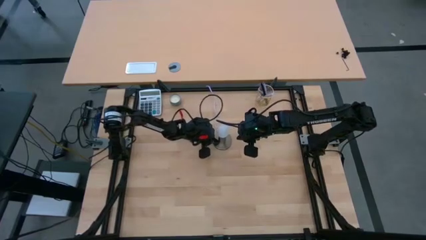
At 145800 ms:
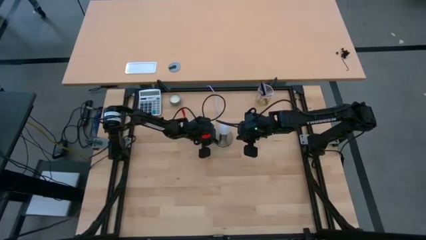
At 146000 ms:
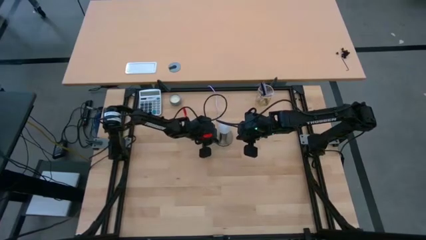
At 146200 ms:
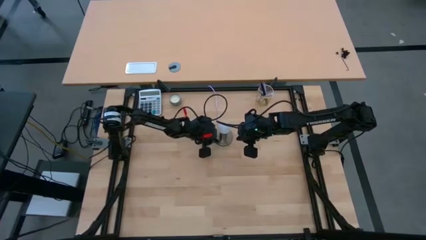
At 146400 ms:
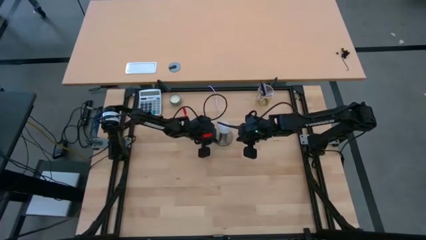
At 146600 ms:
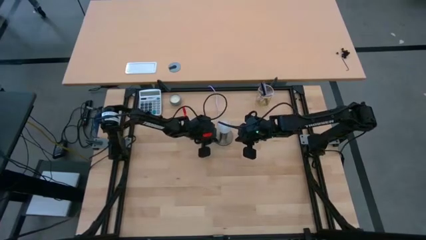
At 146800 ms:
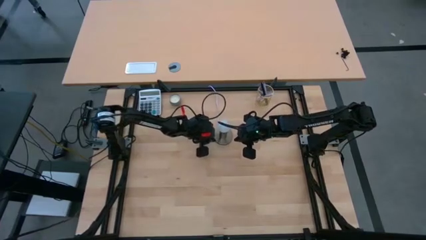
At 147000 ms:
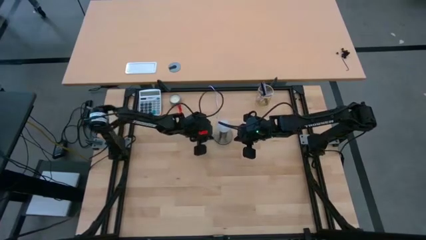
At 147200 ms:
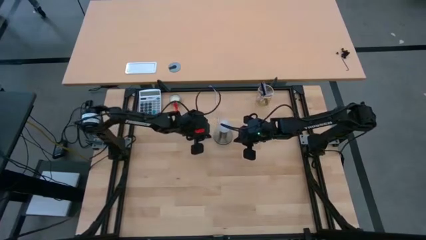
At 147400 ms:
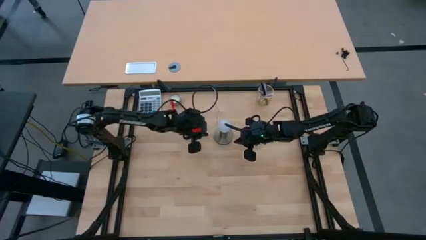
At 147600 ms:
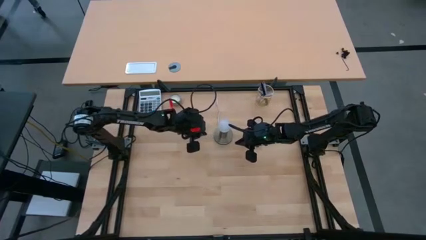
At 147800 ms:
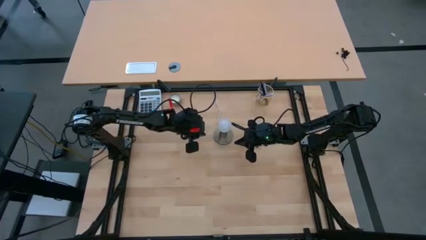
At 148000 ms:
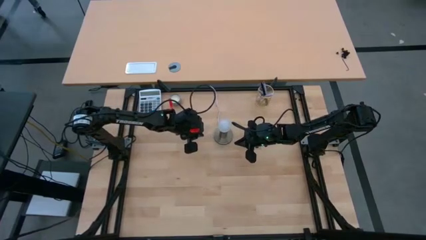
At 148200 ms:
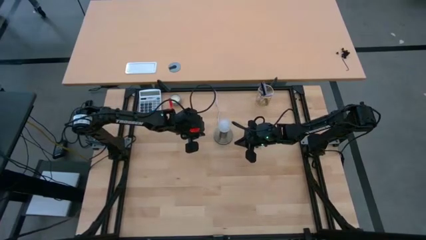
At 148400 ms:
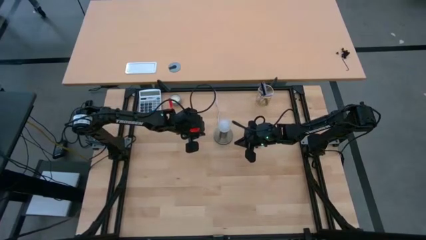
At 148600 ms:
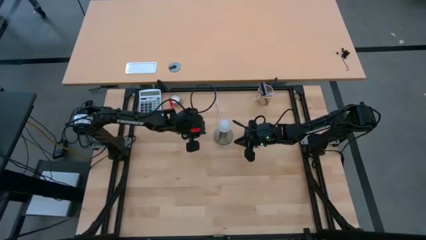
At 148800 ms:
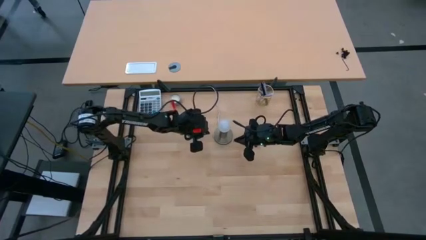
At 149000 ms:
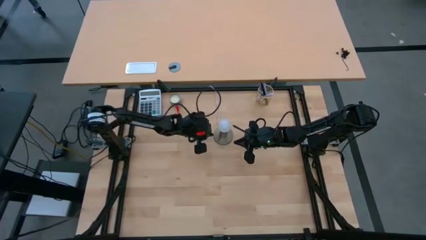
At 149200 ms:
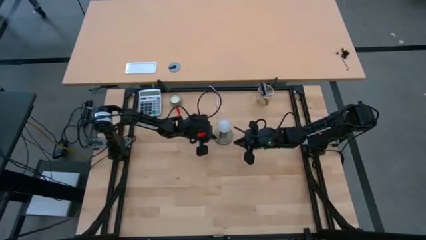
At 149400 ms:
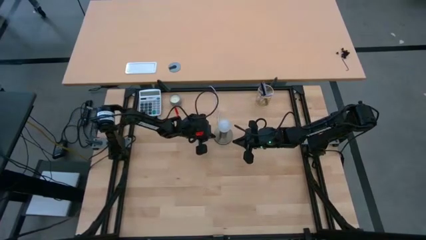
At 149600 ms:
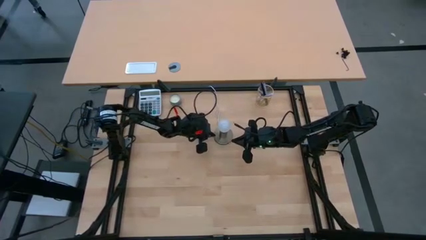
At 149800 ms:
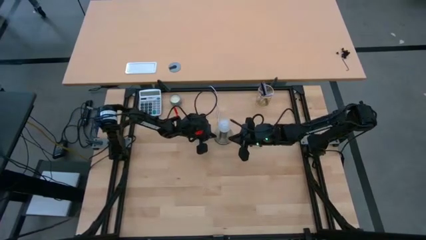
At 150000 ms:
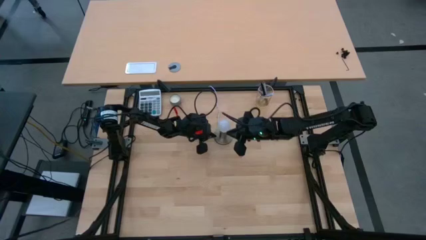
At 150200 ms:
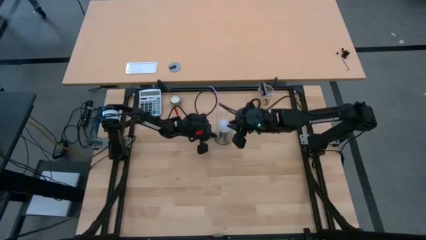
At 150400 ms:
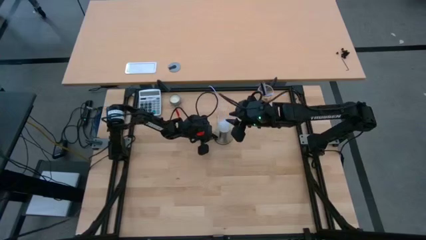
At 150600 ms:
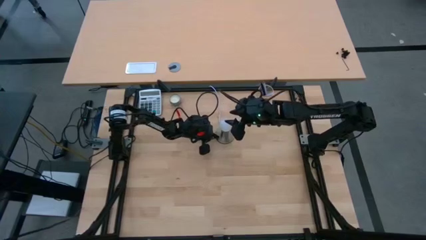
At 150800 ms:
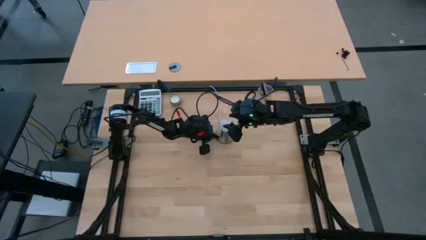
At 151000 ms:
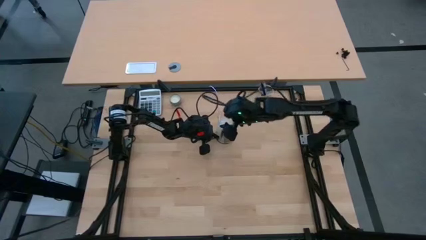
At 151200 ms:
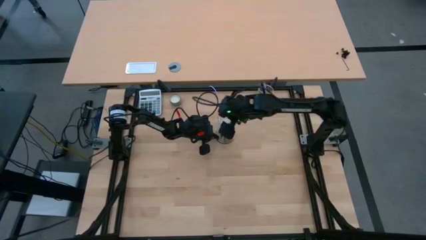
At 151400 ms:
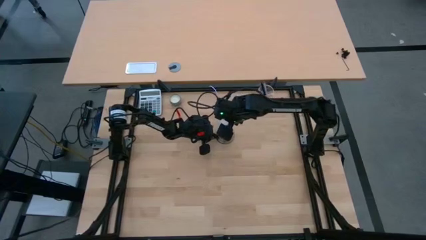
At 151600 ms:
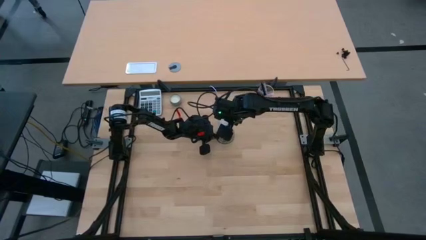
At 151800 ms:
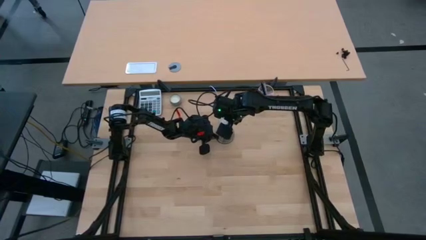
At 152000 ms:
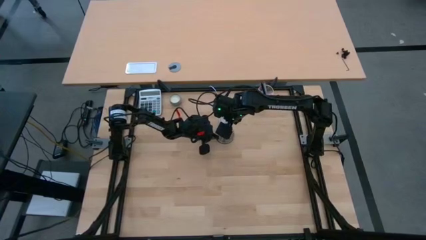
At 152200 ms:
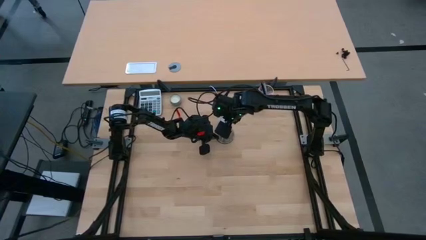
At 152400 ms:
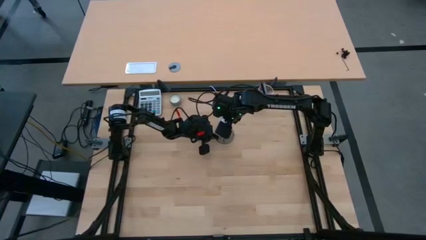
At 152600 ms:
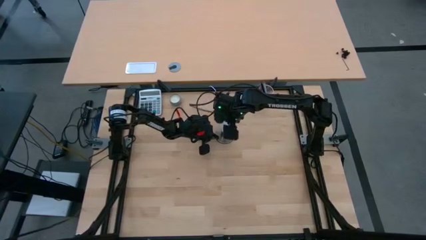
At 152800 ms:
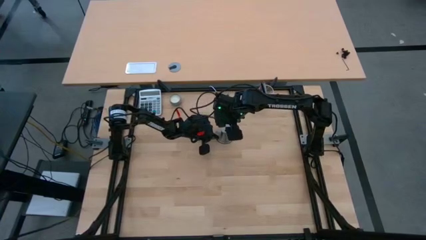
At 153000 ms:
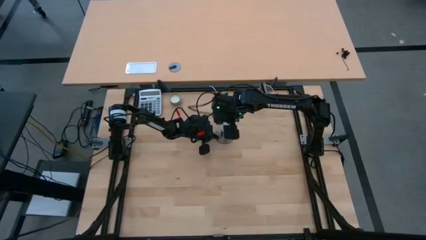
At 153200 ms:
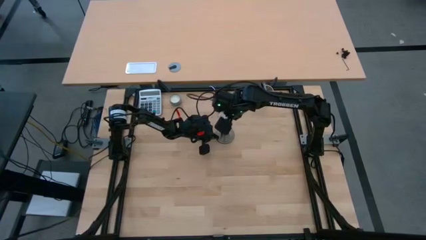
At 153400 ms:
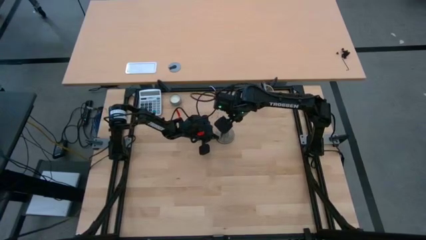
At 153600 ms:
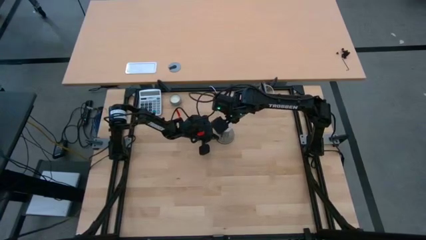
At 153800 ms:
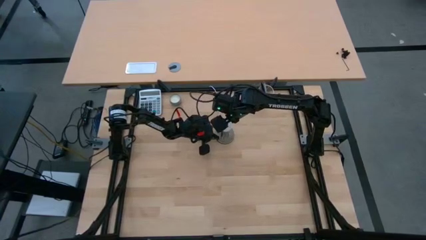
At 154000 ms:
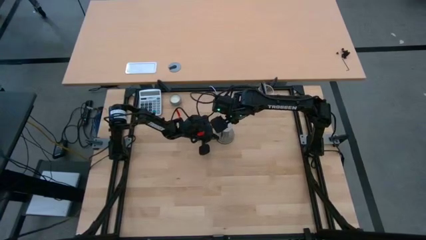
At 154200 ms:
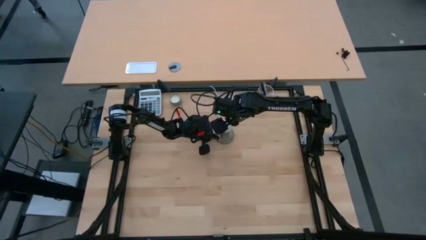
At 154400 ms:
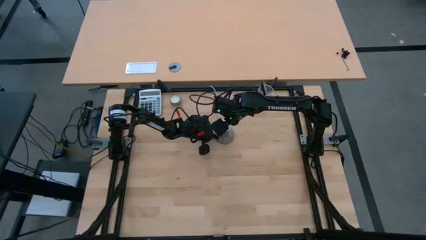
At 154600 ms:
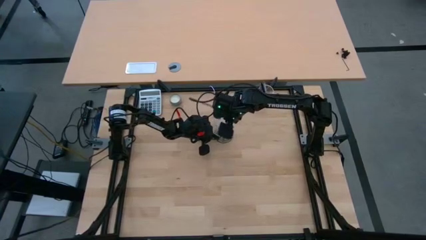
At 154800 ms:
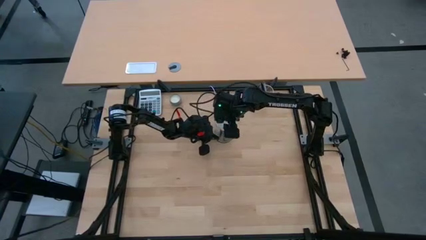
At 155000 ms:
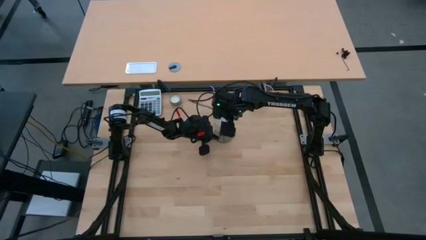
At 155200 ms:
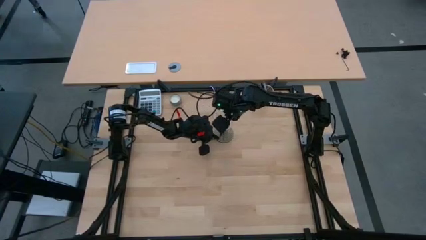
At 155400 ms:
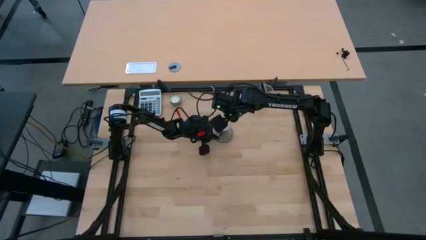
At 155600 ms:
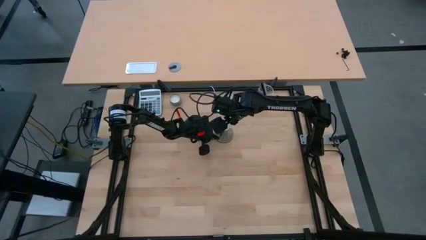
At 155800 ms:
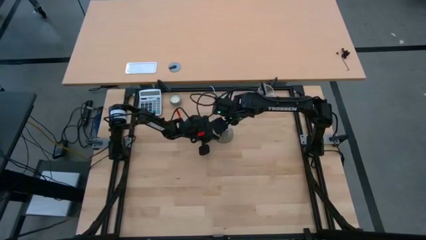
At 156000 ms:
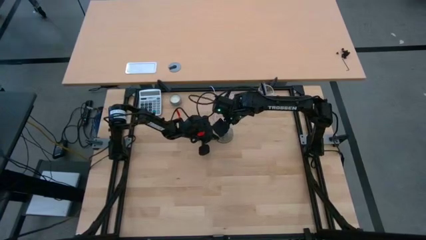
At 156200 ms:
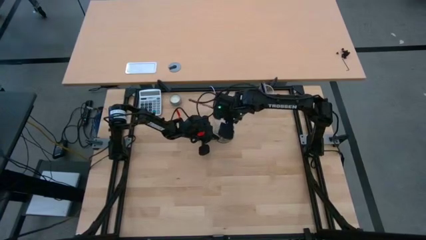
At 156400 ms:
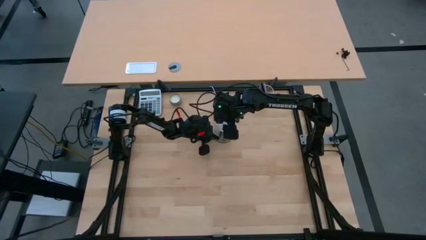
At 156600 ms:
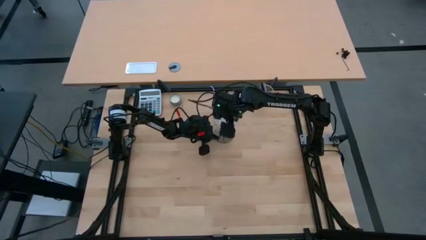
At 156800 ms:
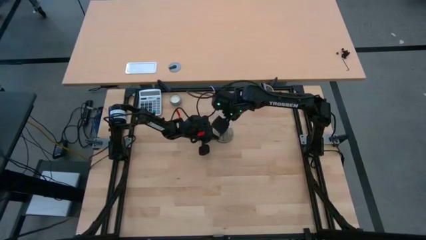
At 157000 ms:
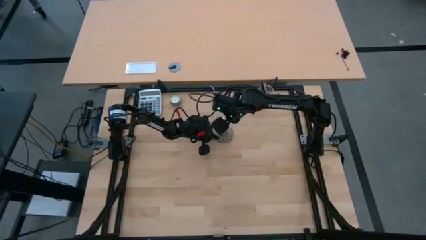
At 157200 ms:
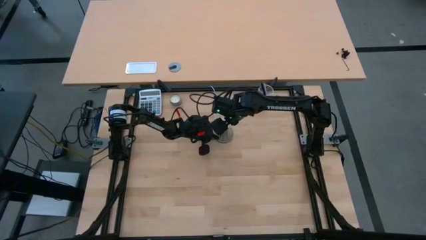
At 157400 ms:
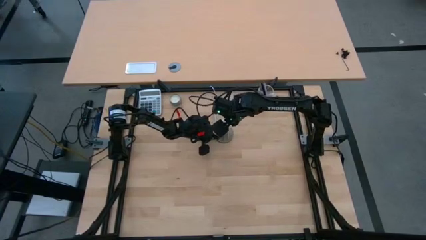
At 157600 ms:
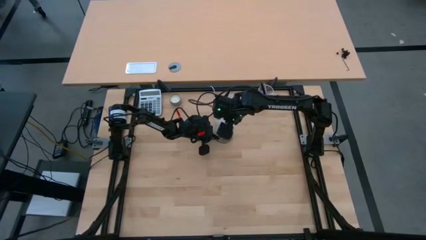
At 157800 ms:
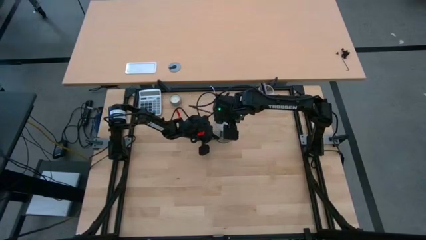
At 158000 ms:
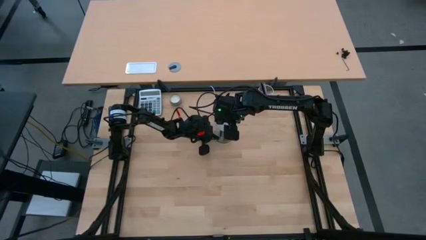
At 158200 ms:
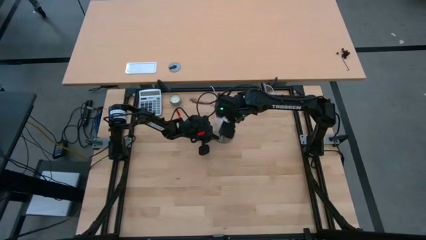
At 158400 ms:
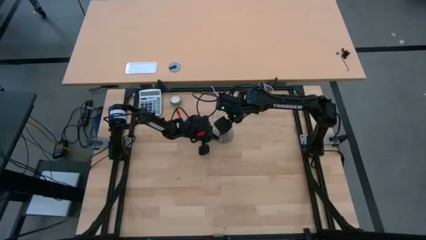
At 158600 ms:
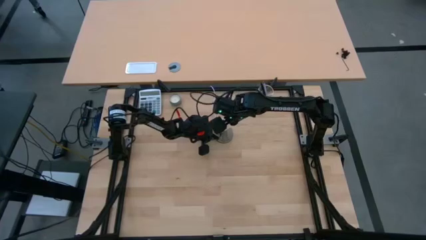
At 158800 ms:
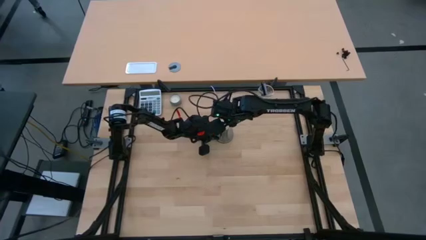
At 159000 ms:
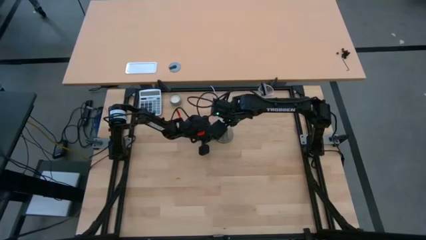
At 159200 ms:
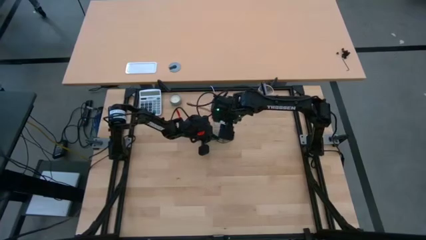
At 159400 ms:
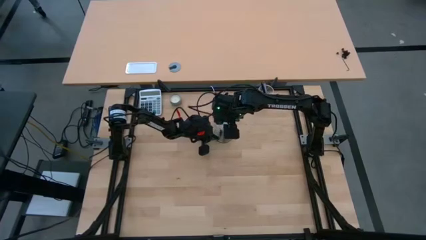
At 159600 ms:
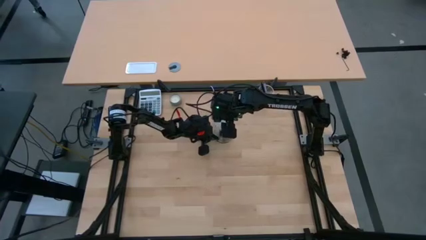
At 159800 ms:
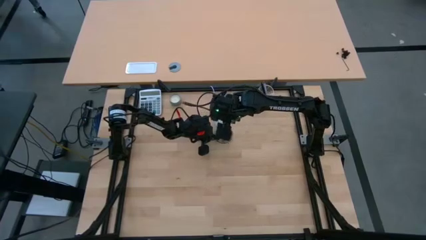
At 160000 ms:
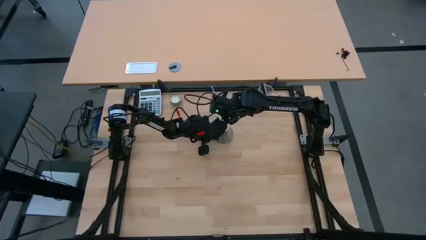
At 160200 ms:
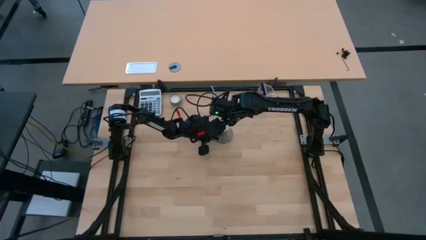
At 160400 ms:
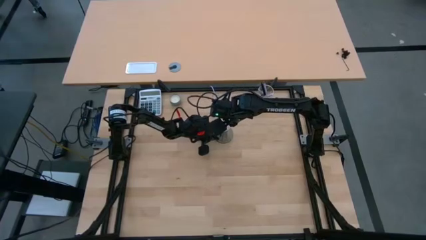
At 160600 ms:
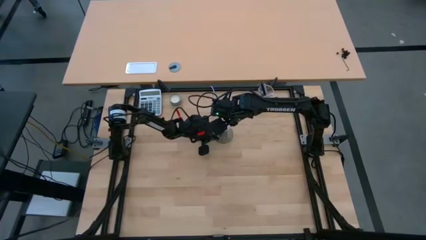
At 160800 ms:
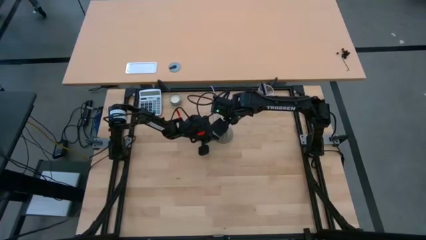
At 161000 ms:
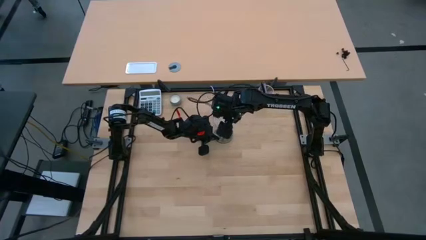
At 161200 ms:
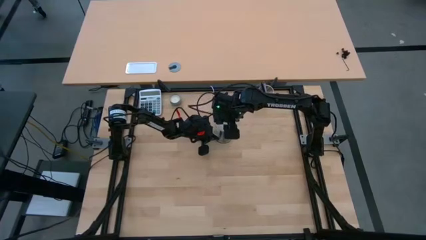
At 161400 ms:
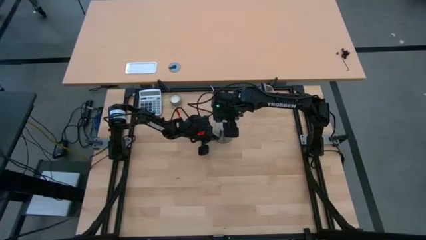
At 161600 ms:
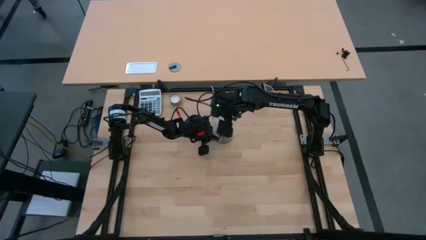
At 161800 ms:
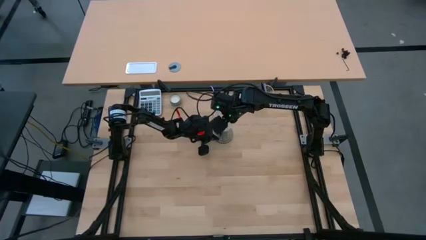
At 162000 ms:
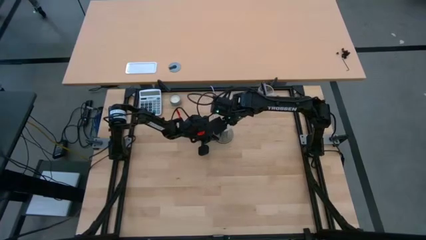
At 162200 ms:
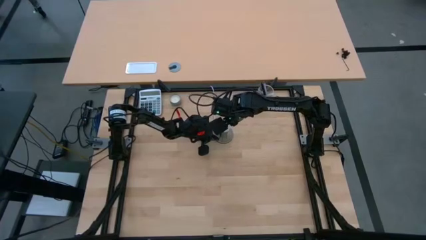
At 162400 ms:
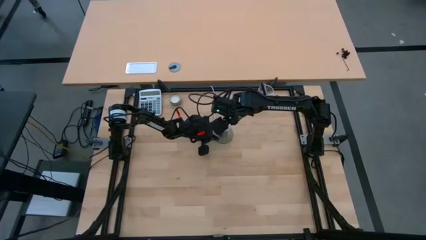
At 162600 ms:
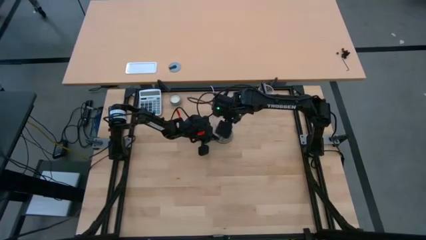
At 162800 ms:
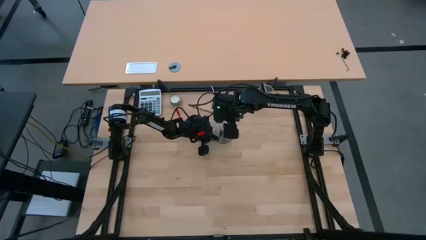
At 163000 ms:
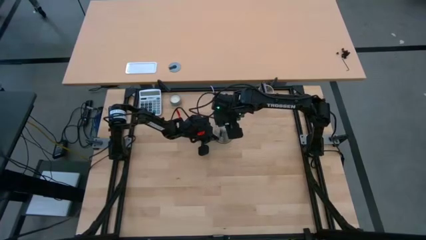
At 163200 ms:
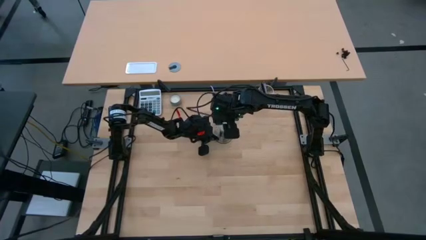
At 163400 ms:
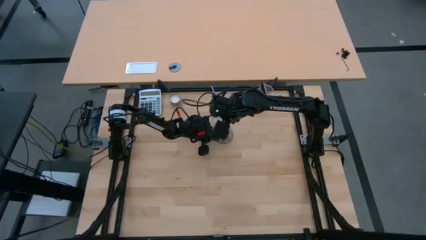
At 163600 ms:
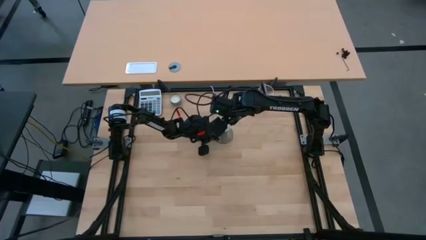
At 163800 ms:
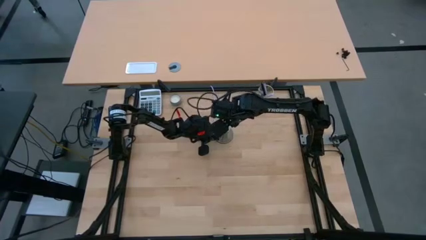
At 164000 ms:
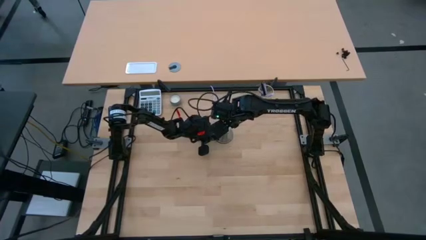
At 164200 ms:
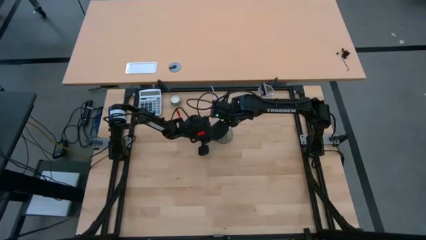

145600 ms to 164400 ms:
Task: Screw lightbulb
Remove the lightbulb from the lamp
